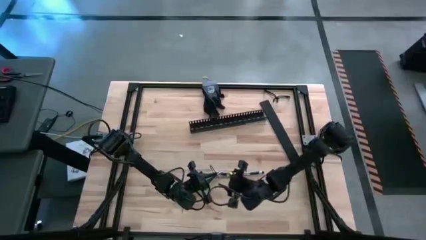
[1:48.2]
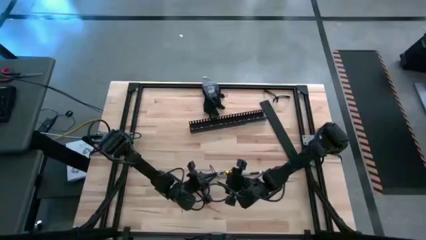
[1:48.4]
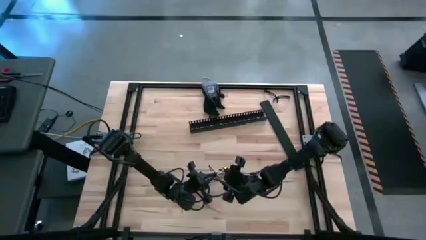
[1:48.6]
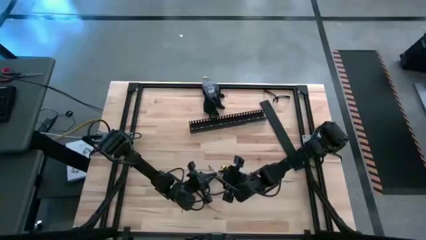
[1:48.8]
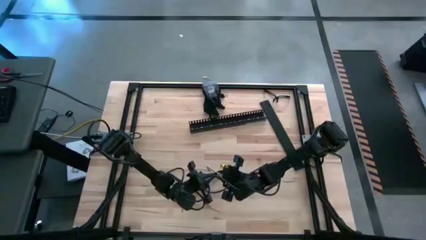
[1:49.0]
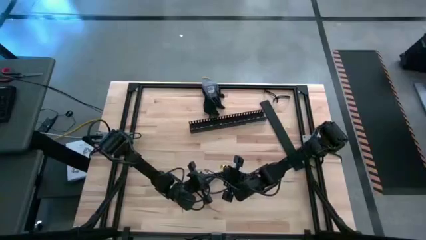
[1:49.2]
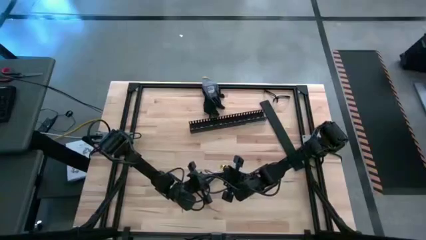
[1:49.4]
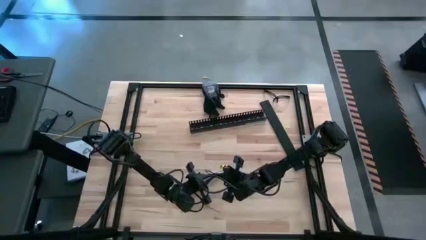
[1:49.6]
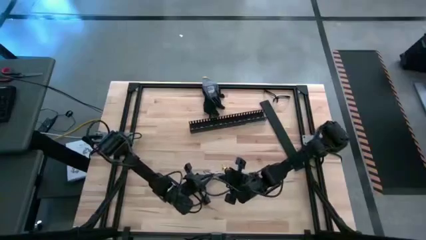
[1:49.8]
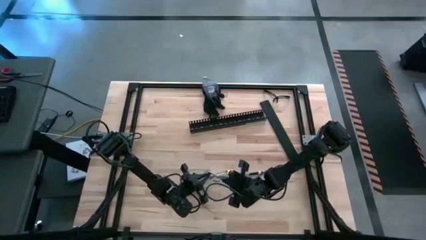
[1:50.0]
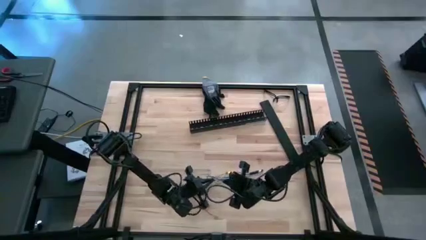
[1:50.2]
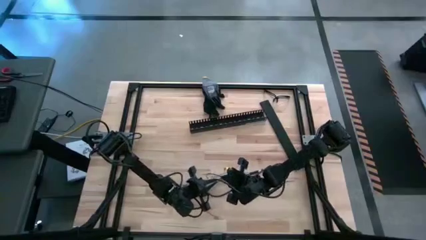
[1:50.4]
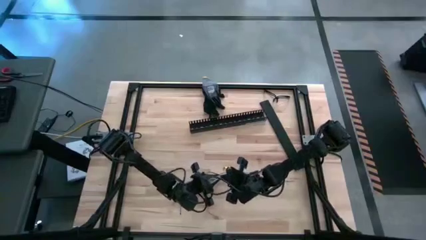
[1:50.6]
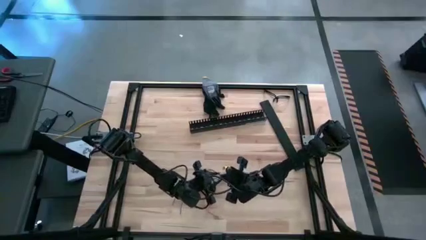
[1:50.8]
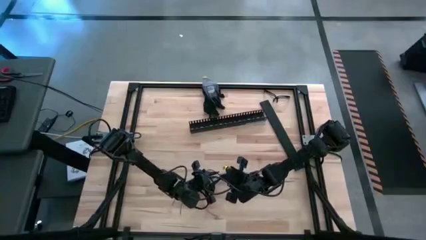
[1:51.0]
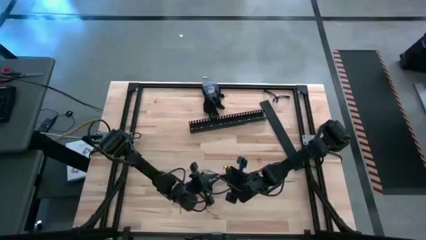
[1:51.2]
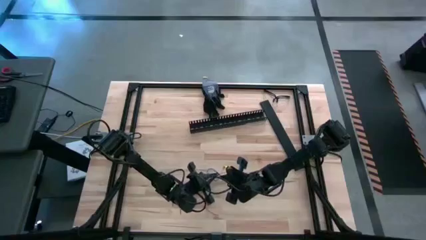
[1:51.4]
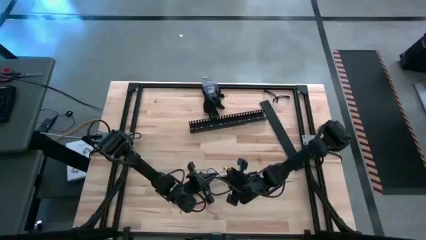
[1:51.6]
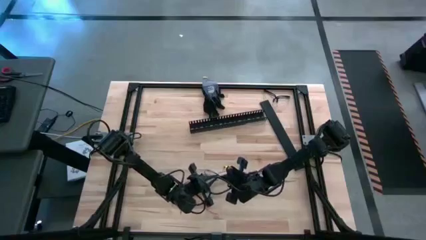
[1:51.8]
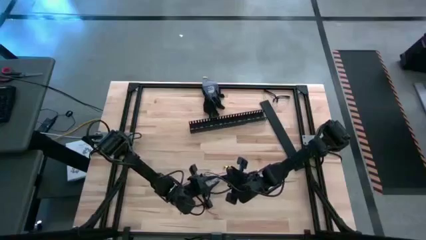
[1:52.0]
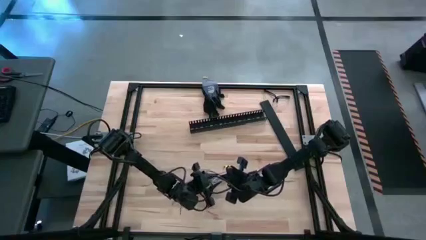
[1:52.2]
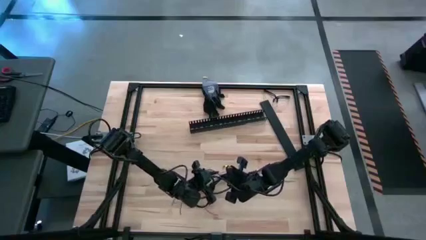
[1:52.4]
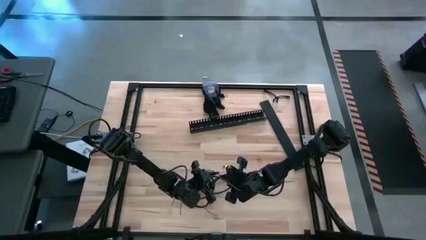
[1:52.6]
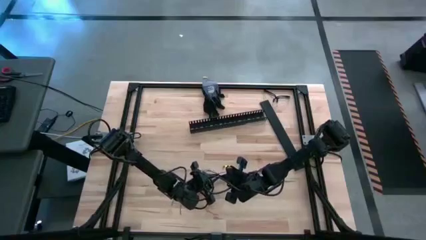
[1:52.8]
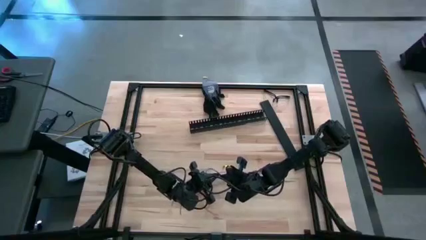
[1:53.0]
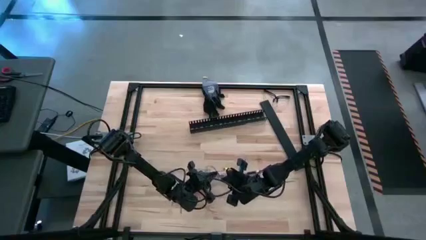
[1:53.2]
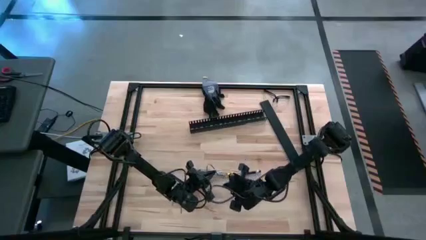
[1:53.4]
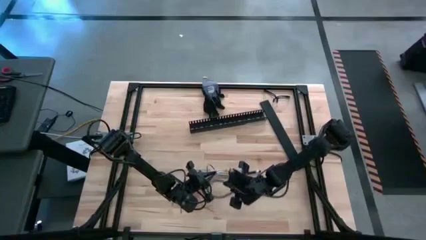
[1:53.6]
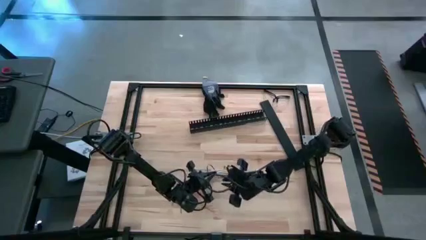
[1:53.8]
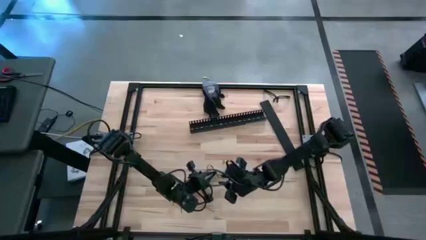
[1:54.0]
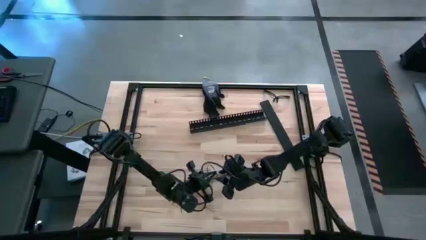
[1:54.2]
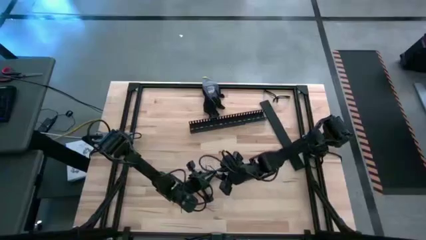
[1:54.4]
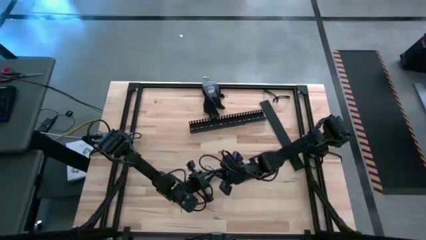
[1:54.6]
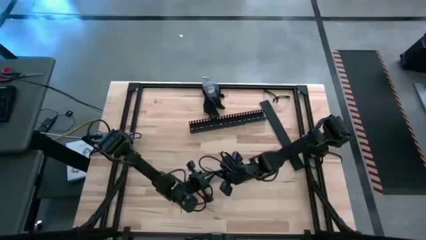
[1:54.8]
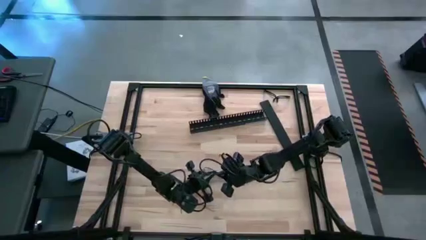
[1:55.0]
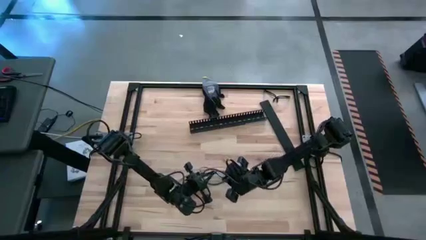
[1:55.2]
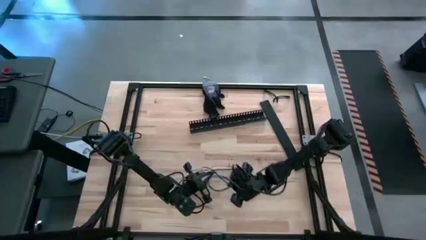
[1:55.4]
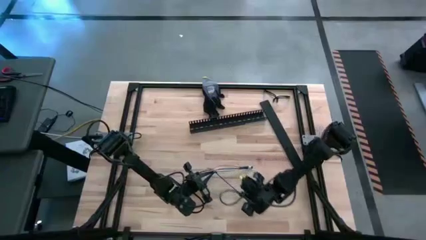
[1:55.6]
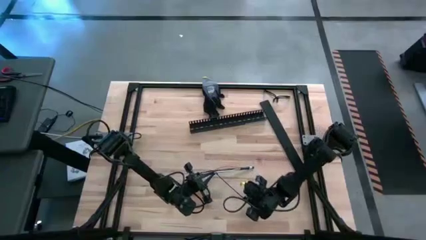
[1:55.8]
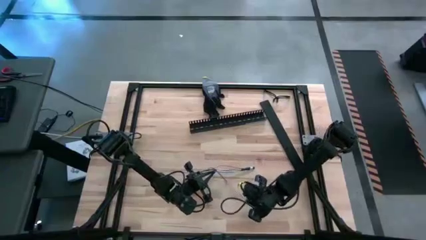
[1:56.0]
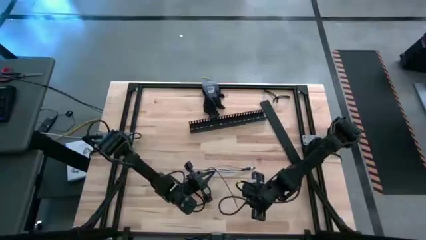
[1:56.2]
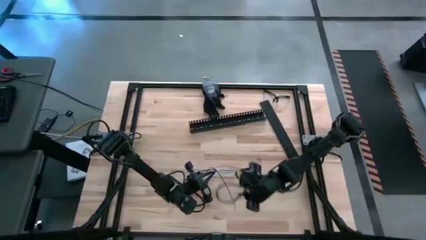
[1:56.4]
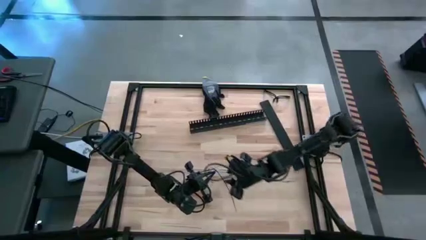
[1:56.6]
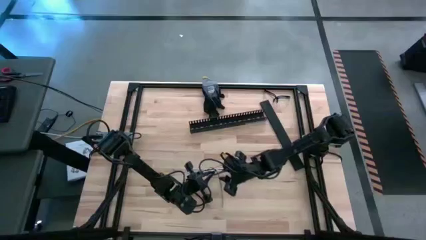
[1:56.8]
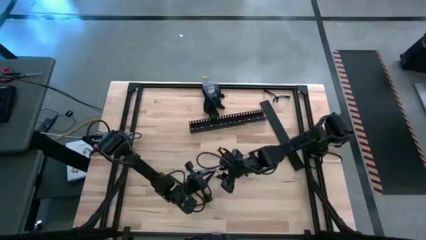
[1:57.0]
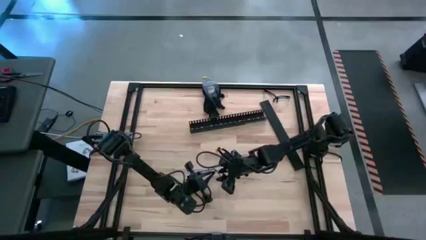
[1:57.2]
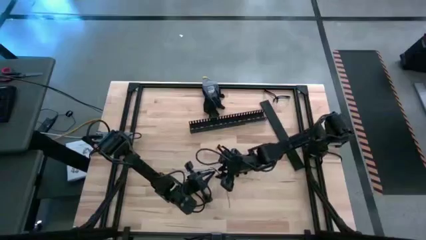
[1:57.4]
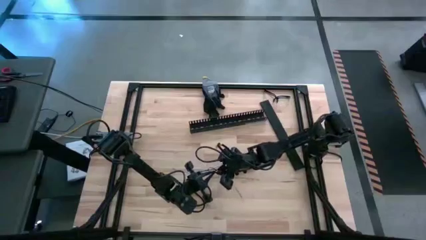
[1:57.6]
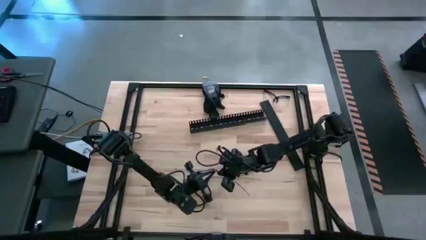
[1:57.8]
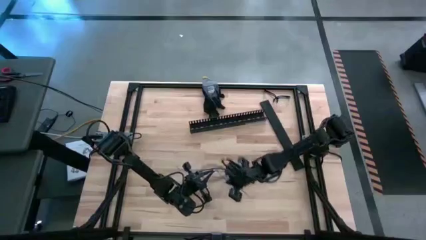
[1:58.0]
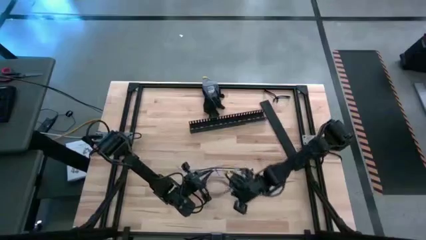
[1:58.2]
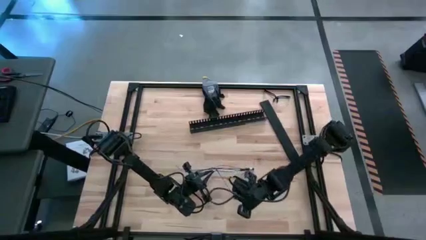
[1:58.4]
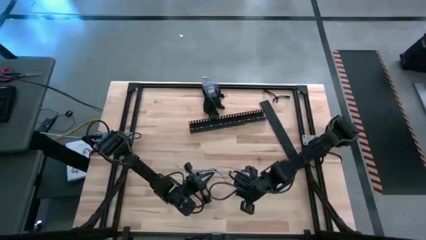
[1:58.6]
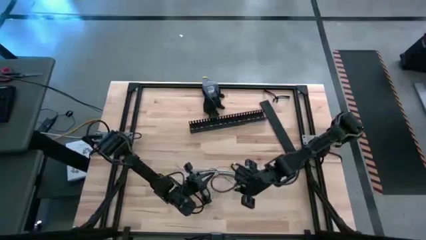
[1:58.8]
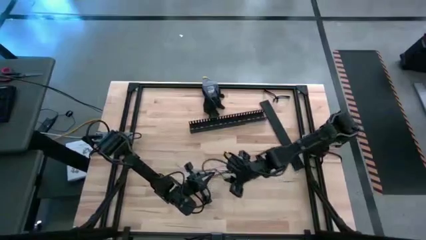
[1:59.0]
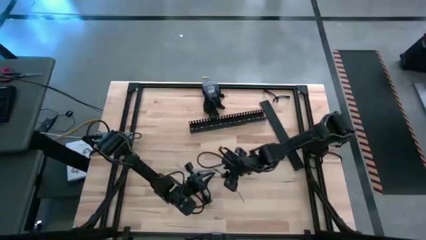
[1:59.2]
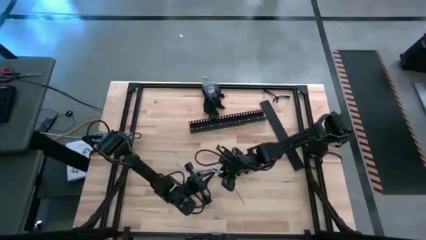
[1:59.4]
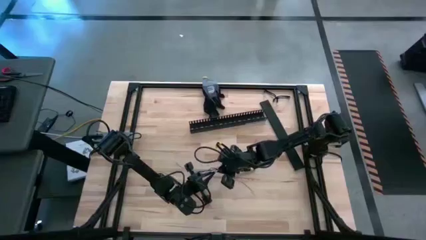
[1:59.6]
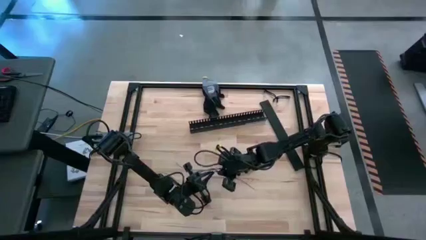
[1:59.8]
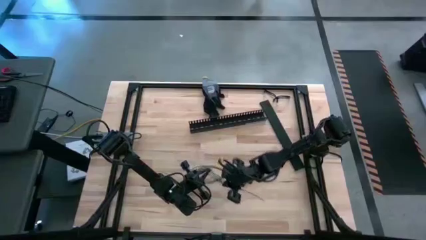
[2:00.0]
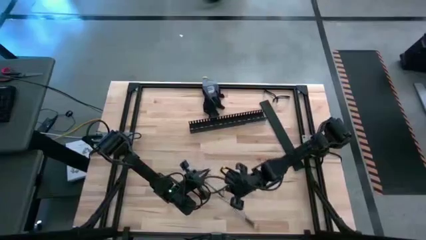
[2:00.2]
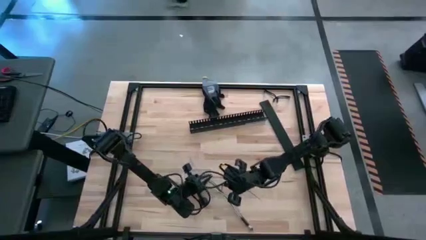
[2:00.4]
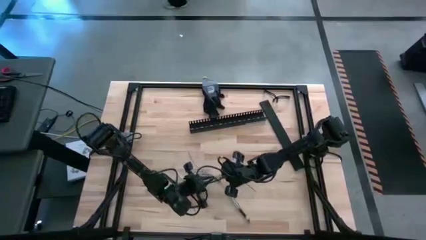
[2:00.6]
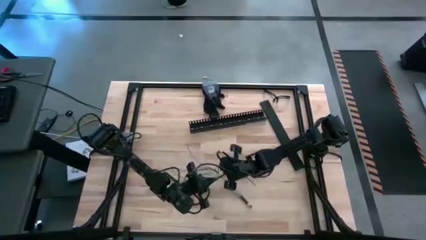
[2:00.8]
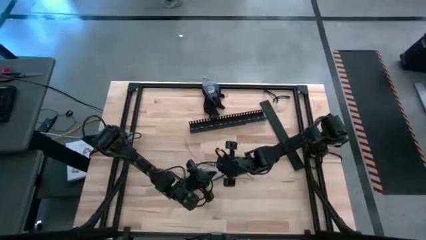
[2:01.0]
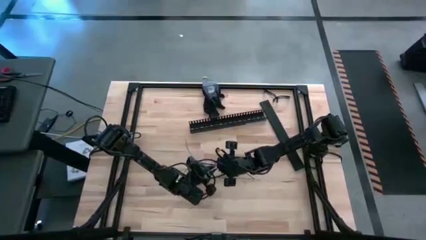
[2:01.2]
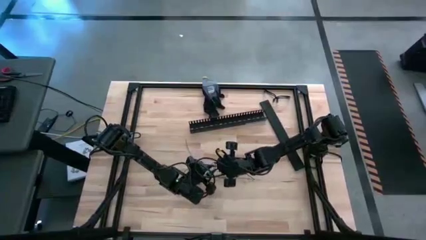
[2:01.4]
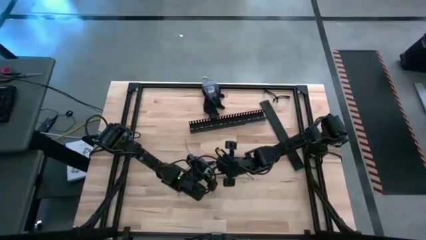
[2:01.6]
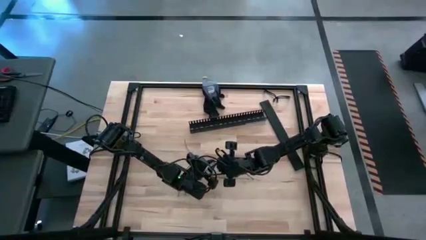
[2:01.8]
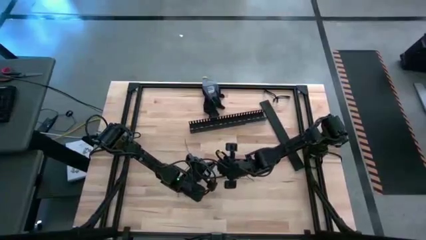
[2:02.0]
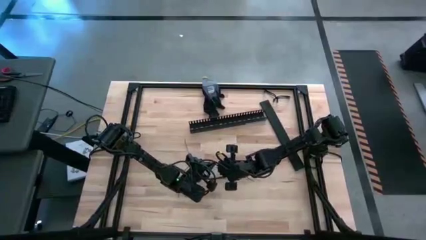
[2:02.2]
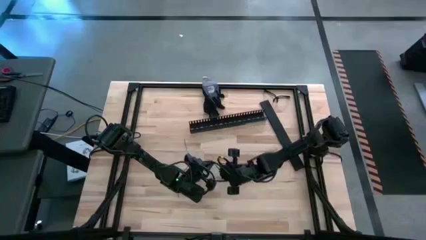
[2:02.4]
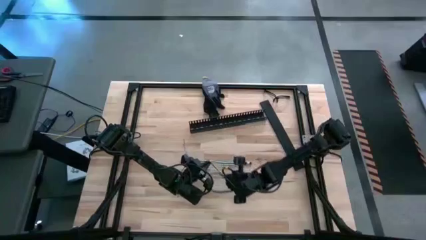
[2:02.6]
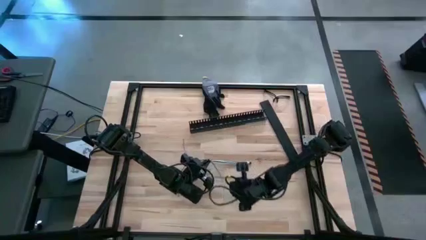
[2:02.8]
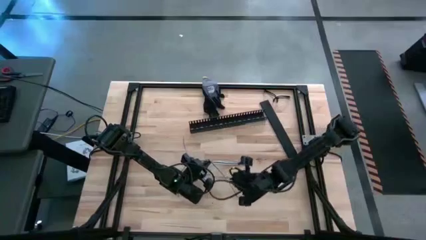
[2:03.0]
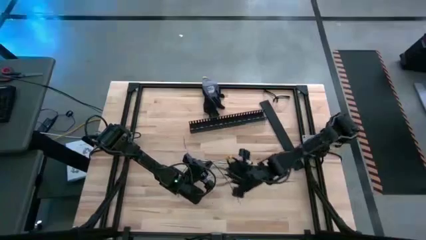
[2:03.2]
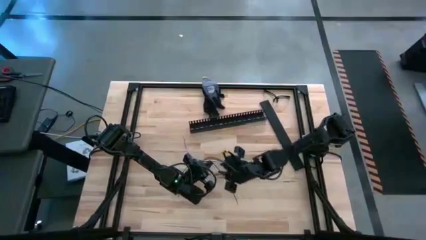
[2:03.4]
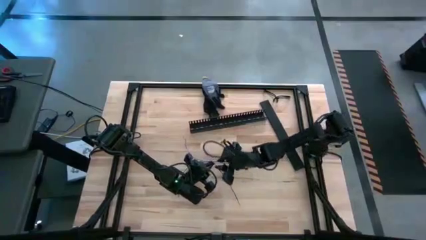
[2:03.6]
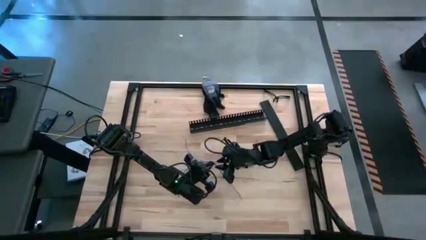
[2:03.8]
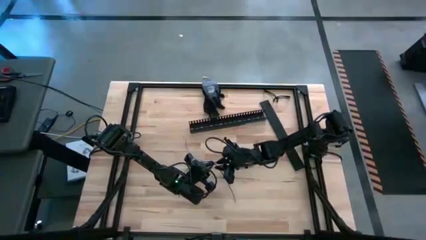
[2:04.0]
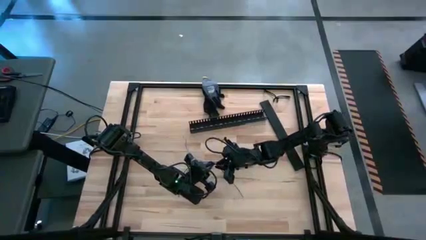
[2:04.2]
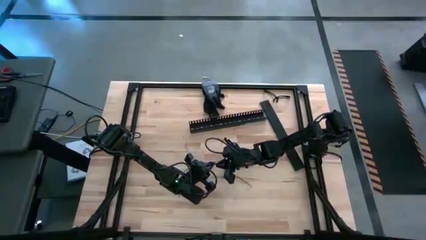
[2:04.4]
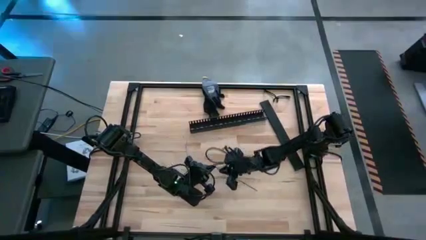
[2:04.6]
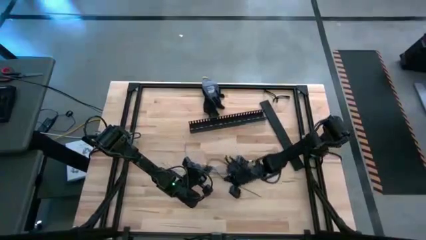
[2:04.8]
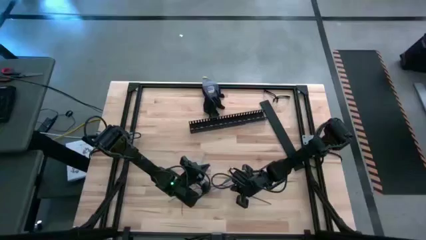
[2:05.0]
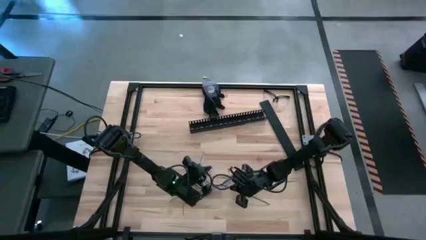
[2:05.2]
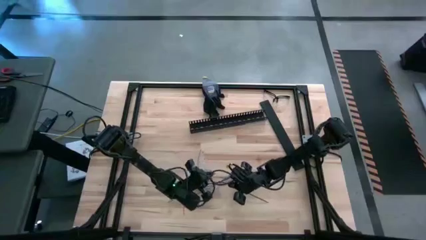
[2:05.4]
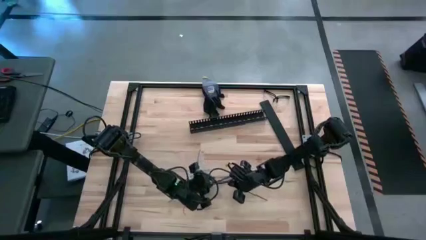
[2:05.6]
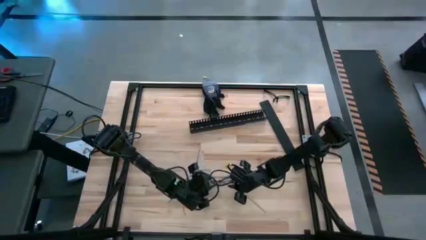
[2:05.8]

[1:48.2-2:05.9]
Task: Ziptie cables
Wrap the colored loose cables with the black zip tie
